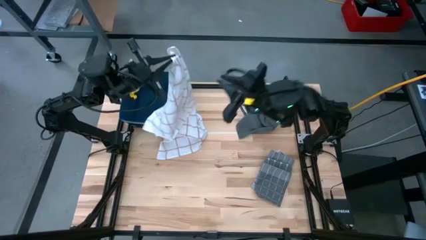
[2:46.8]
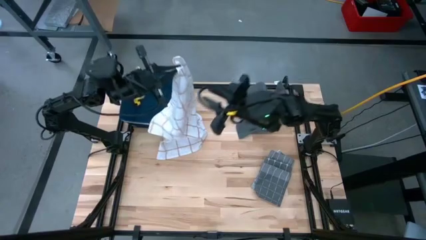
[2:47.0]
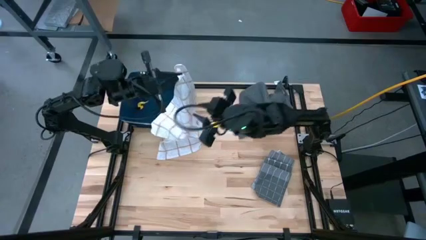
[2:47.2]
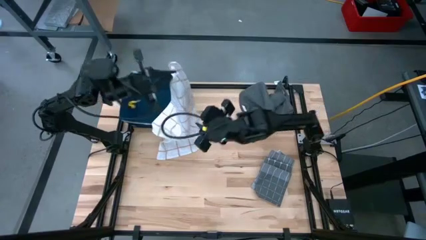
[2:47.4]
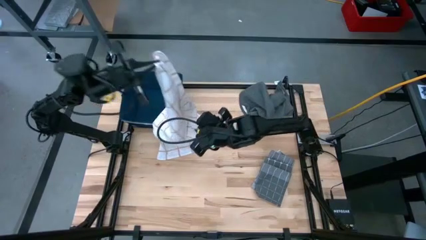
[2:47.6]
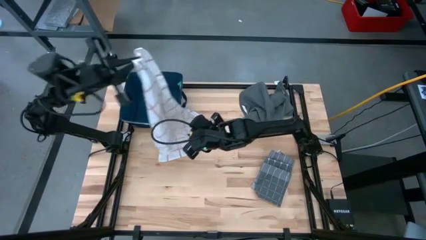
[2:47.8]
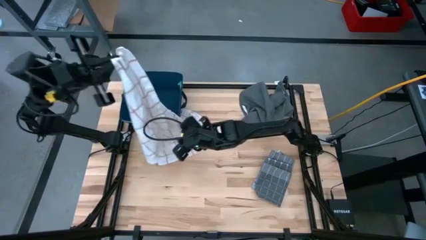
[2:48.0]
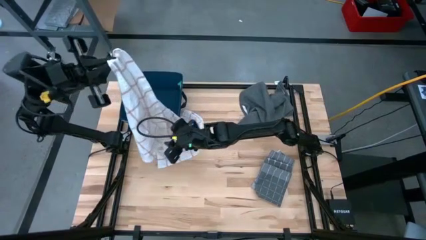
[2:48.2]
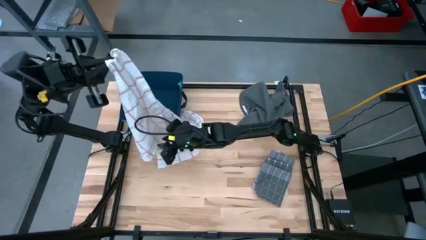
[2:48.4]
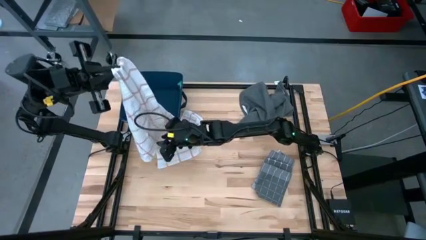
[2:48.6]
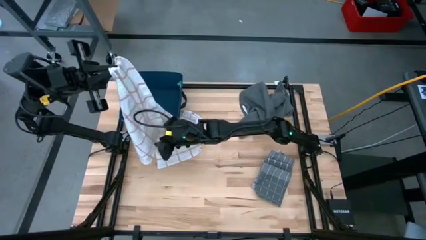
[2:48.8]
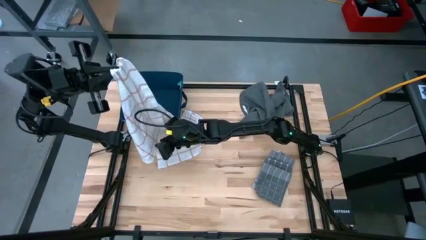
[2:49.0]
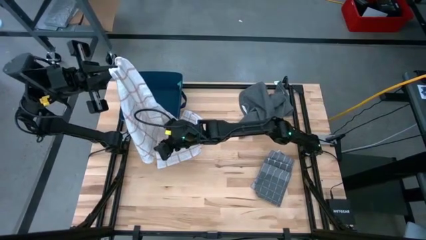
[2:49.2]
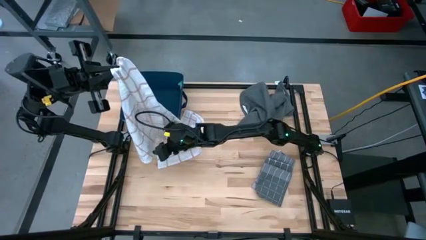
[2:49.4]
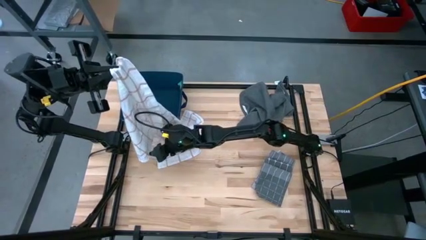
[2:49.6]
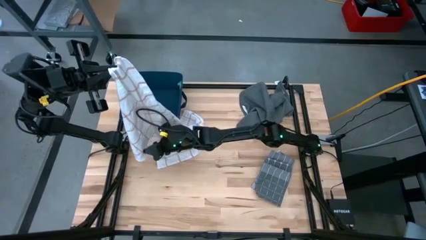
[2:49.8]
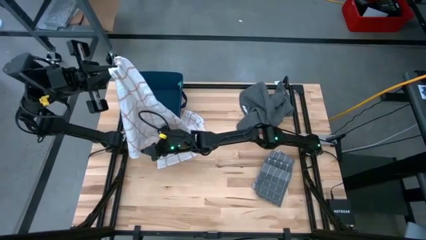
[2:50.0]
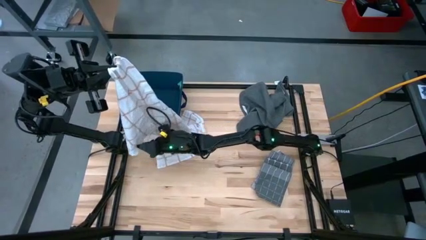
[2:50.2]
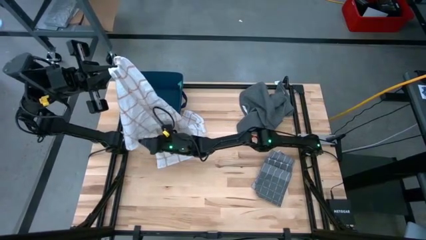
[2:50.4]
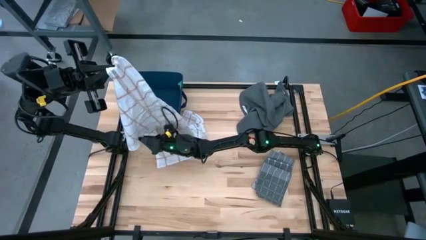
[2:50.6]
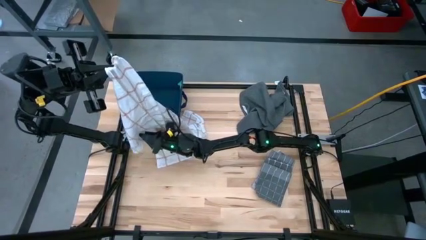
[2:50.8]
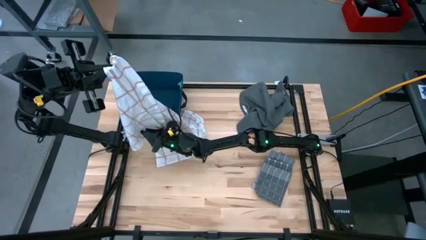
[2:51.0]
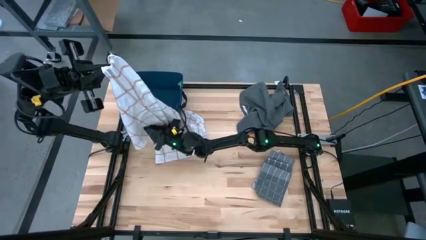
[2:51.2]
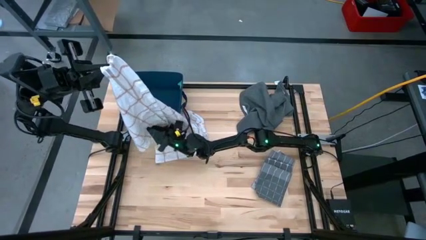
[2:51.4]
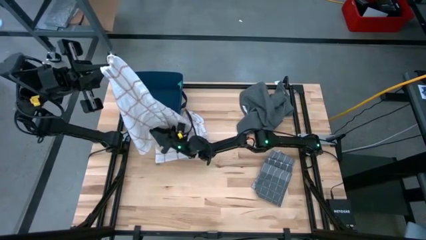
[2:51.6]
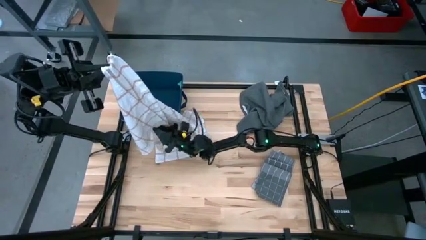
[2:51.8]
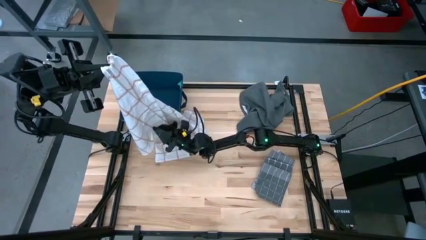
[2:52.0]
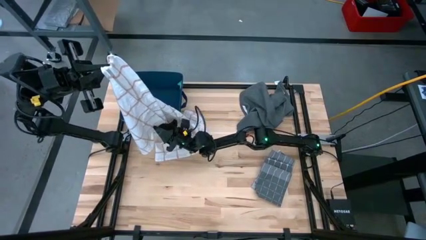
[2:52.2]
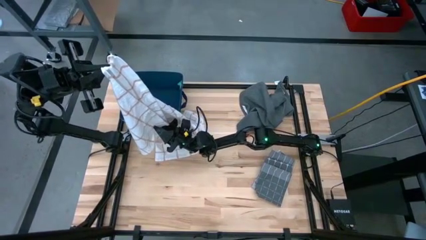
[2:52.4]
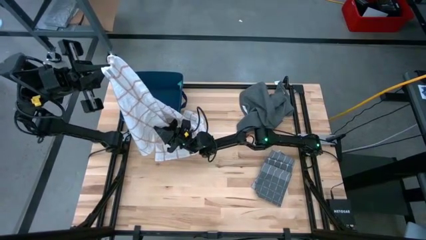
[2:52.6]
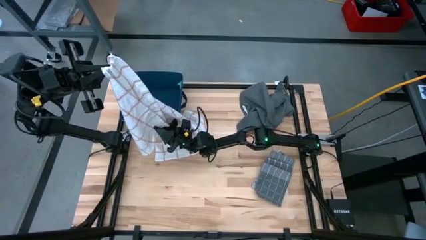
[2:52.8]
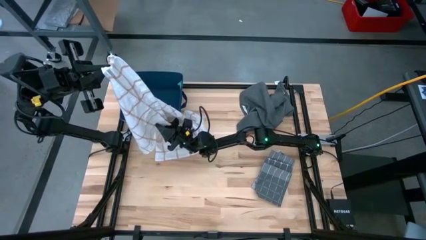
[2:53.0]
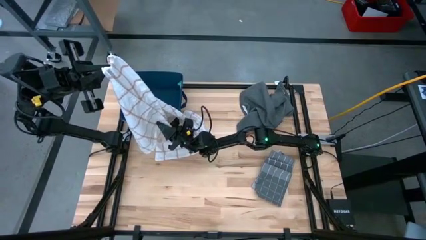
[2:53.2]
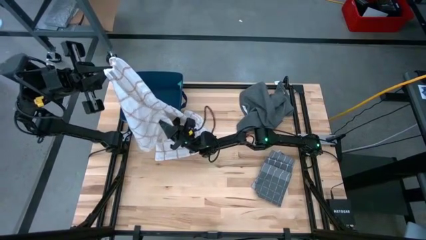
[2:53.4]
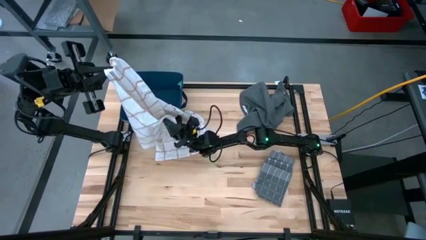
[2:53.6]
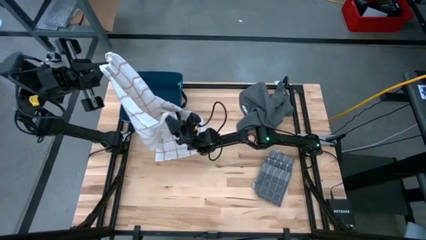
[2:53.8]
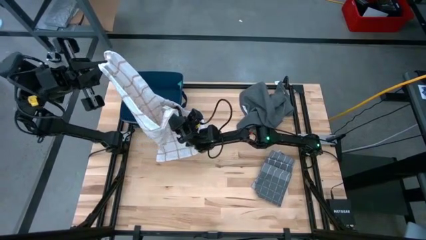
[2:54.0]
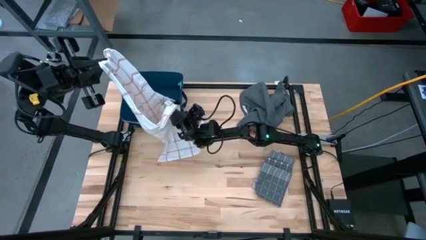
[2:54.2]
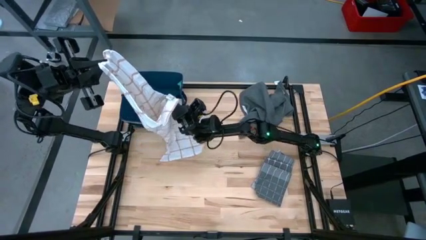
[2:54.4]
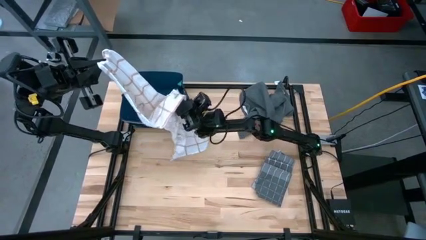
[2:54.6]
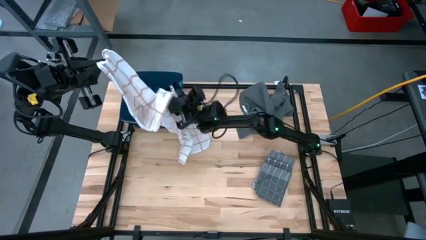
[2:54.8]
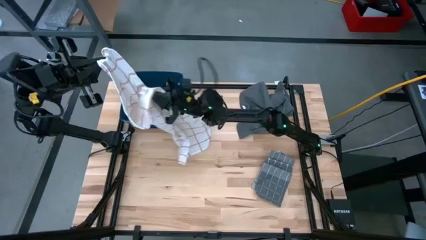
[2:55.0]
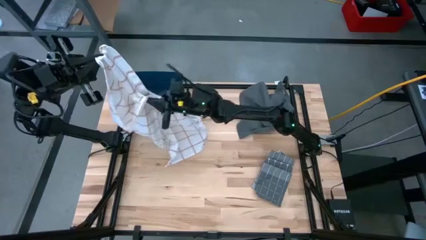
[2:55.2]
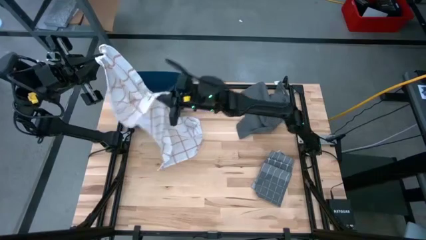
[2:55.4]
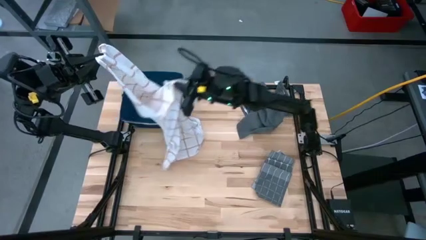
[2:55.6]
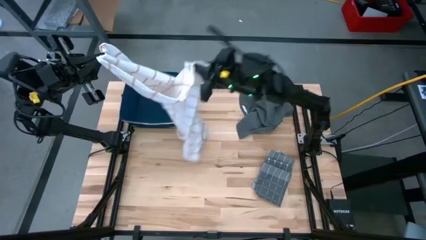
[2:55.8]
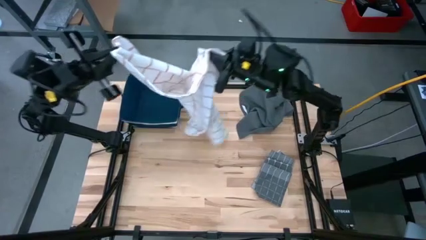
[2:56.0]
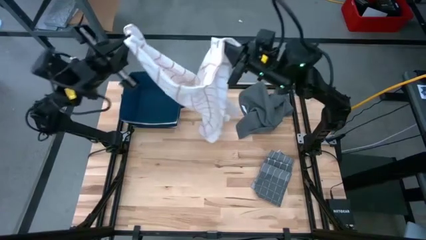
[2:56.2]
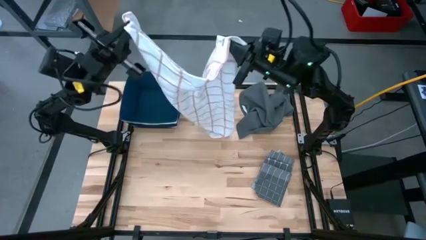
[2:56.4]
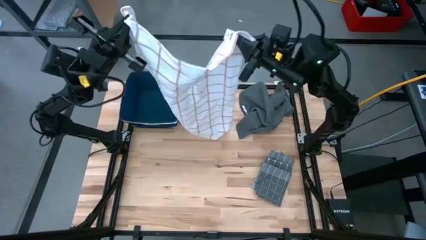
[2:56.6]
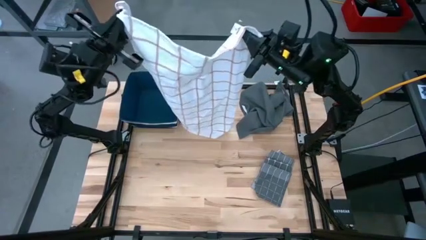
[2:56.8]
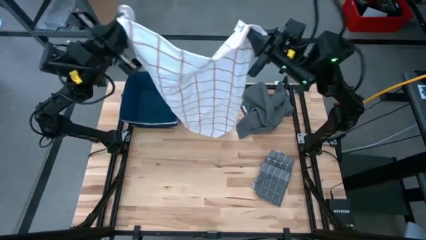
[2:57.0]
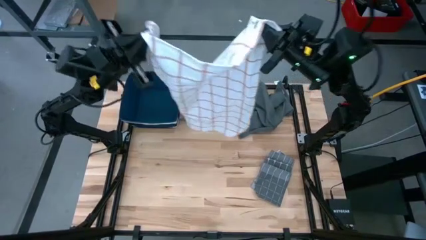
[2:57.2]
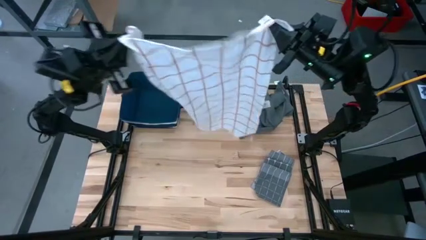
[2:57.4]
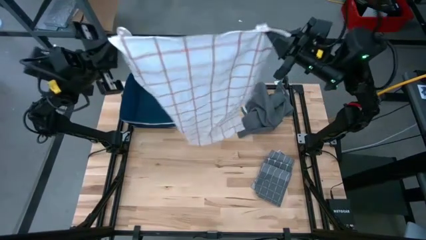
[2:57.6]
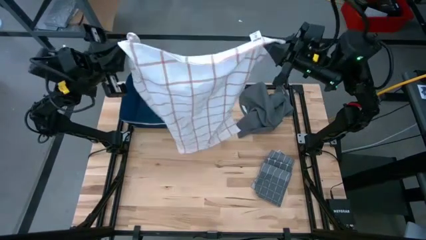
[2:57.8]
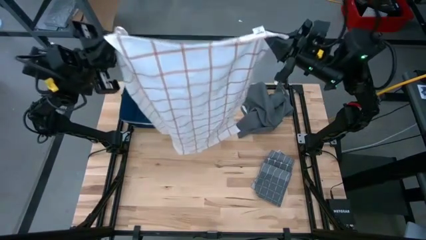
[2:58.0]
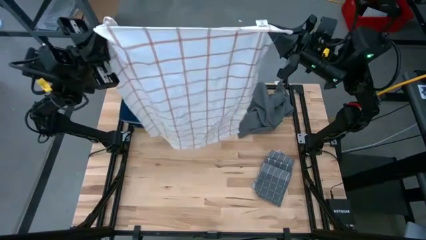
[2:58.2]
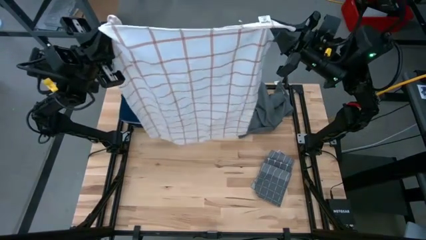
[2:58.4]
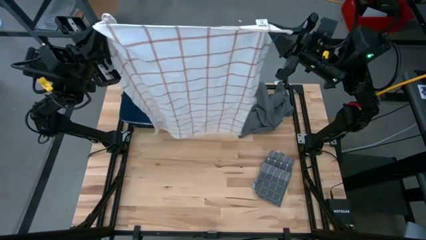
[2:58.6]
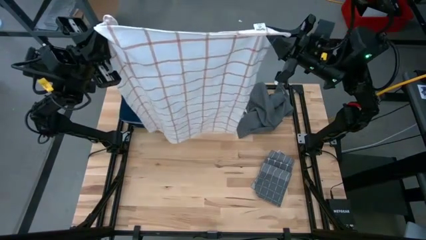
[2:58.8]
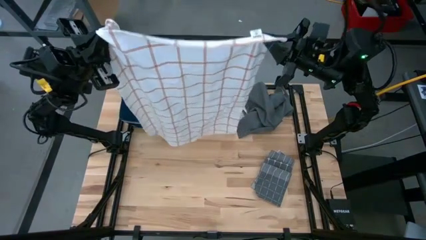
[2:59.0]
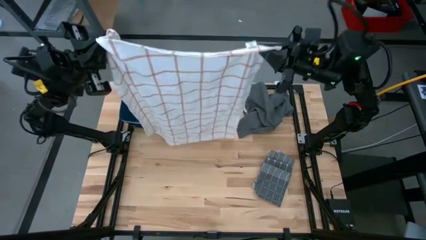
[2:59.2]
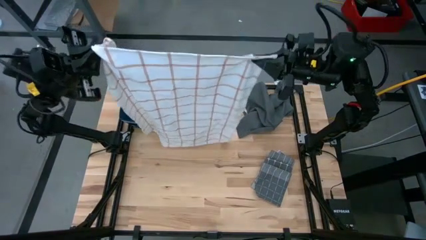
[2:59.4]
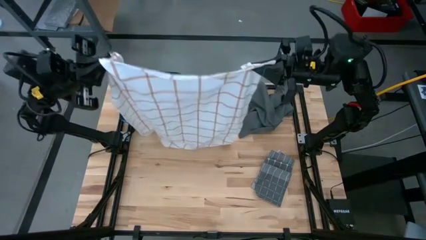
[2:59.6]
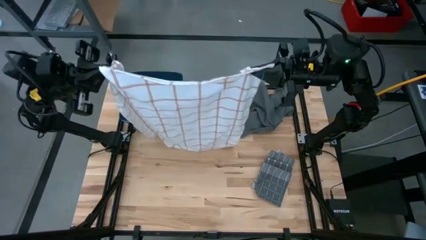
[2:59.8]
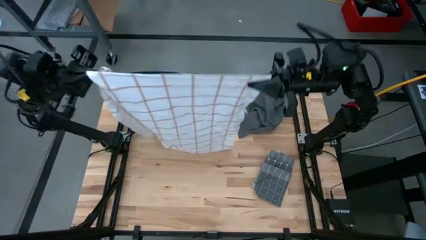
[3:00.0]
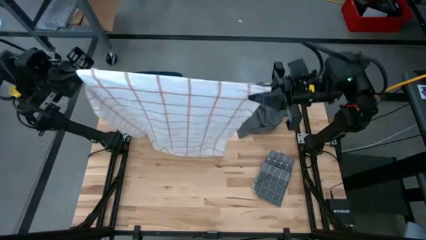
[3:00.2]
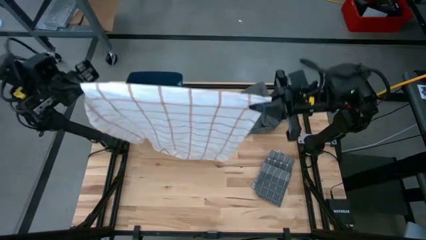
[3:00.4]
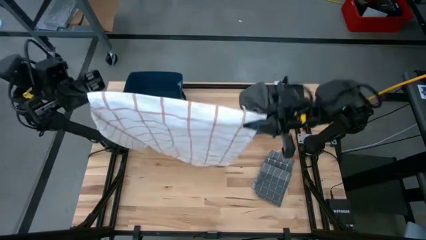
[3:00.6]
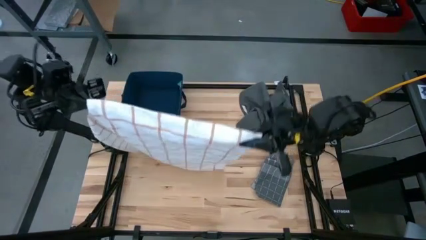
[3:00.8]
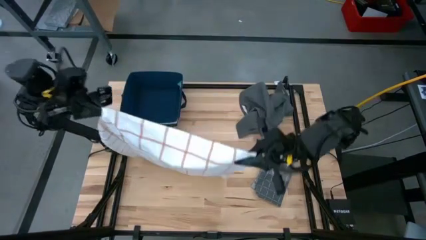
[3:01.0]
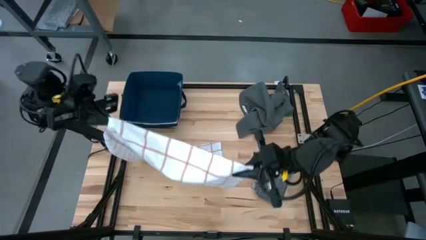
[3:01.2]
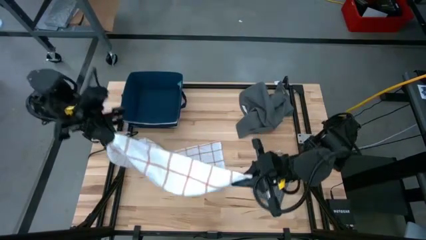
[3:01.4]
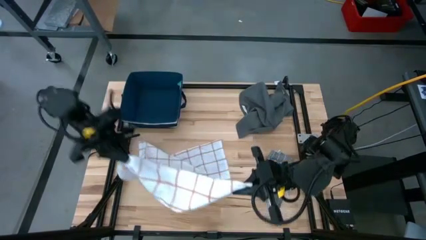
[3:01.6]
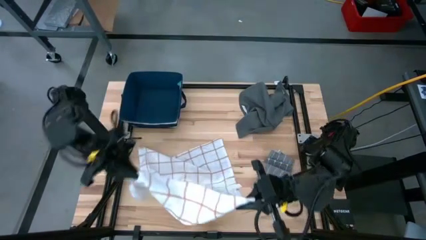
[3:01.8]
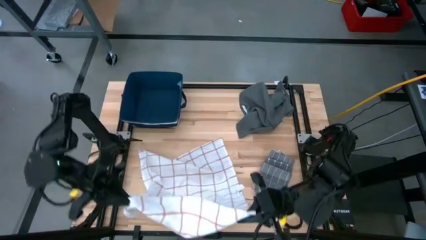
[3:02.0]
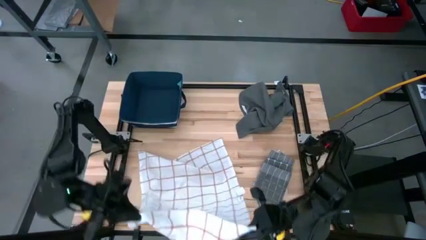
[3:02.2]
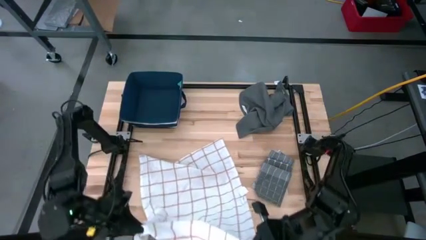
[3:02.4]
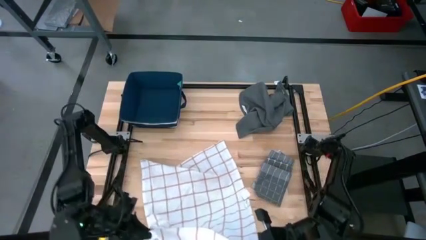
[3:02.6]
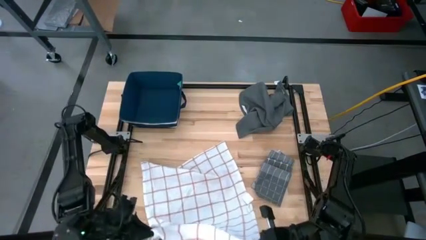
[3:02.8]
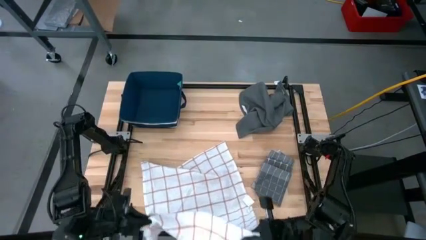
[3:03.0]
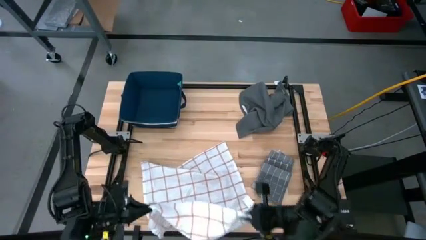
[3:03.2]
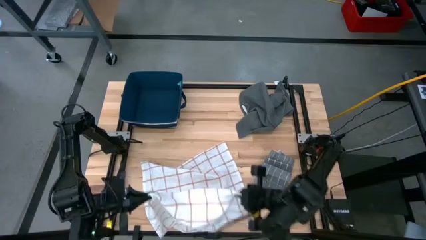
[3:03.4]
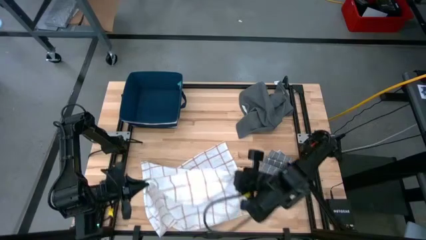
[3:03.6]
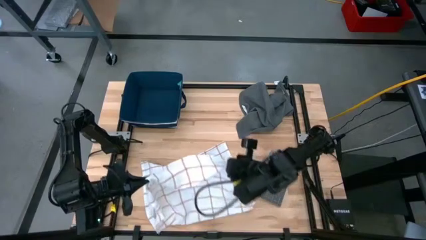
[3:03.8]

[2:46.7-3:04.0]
Task: Fold towel
Fold the white towel
